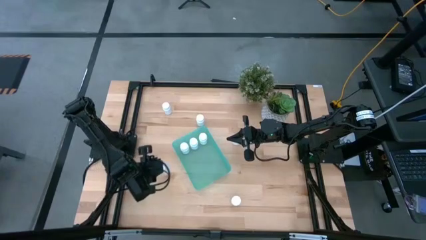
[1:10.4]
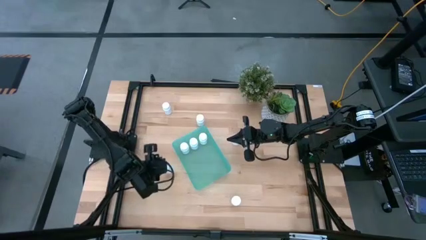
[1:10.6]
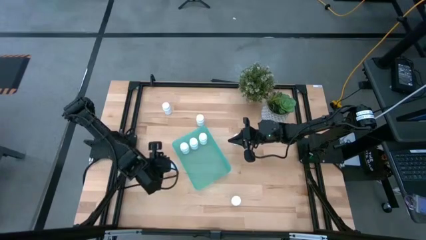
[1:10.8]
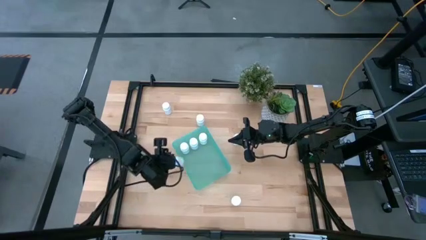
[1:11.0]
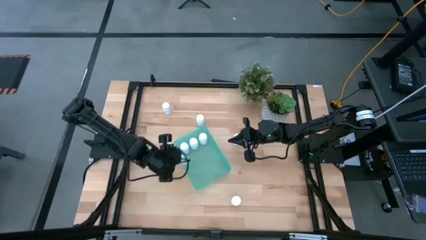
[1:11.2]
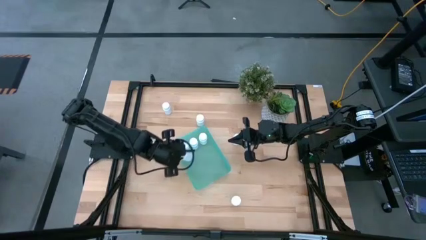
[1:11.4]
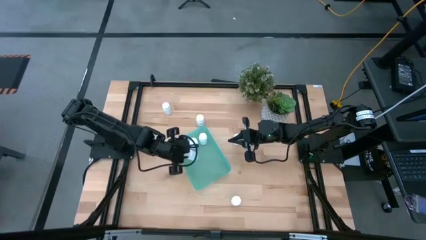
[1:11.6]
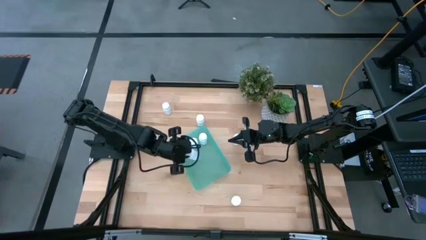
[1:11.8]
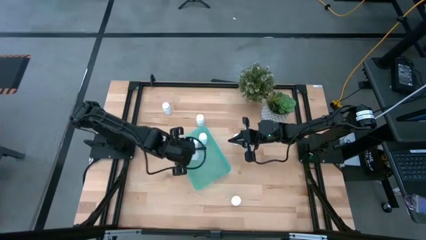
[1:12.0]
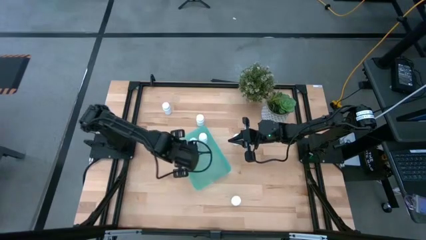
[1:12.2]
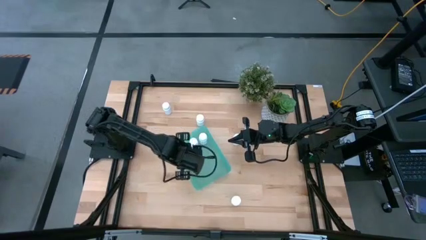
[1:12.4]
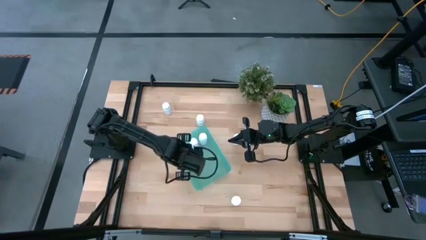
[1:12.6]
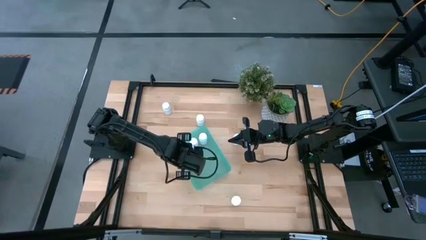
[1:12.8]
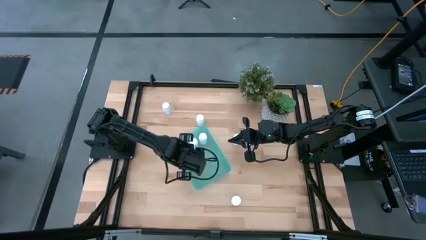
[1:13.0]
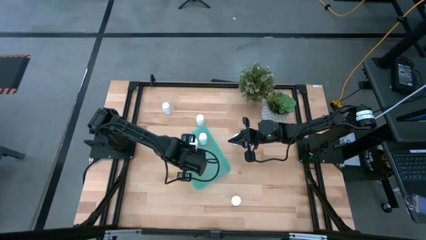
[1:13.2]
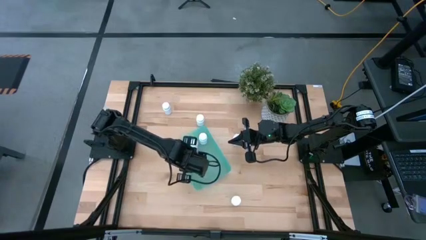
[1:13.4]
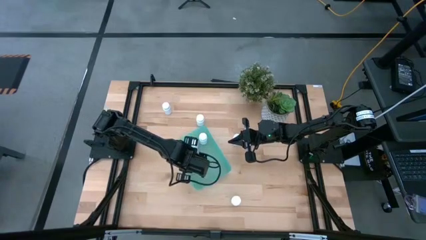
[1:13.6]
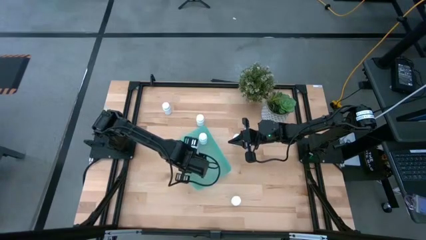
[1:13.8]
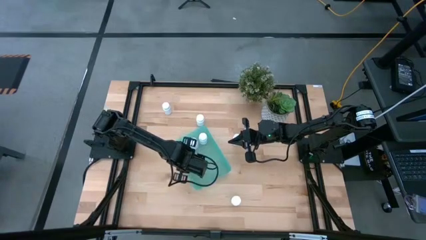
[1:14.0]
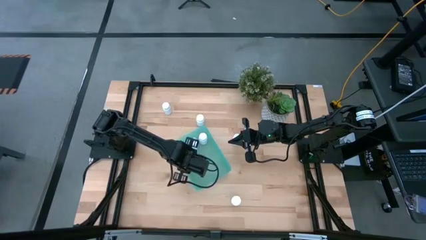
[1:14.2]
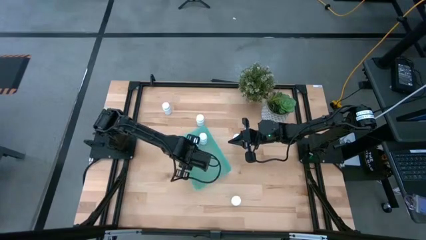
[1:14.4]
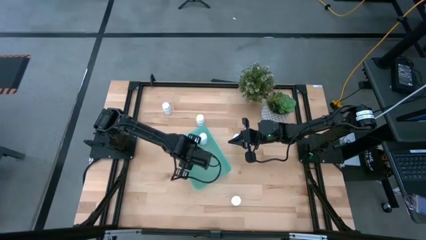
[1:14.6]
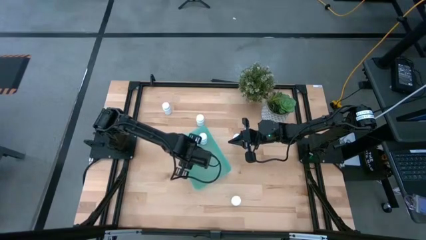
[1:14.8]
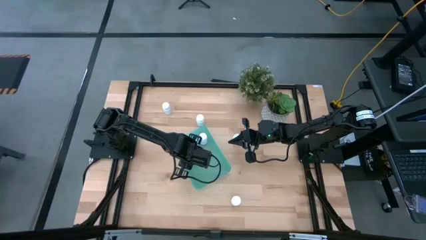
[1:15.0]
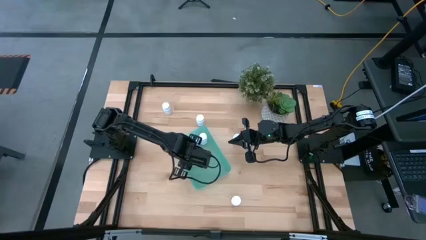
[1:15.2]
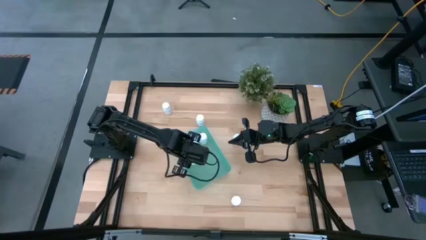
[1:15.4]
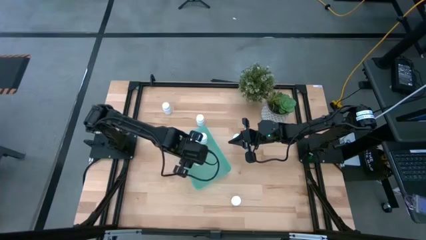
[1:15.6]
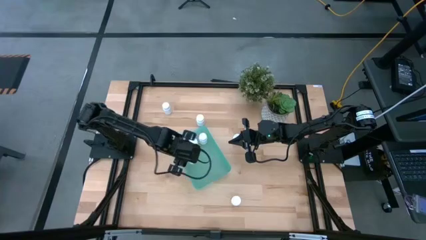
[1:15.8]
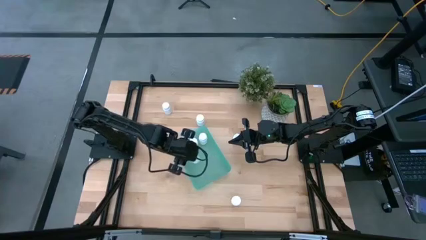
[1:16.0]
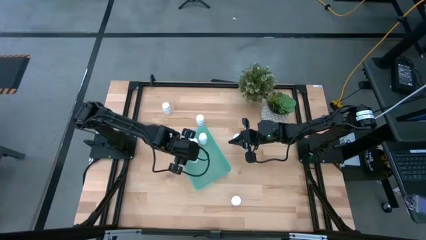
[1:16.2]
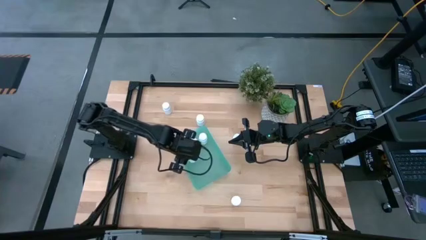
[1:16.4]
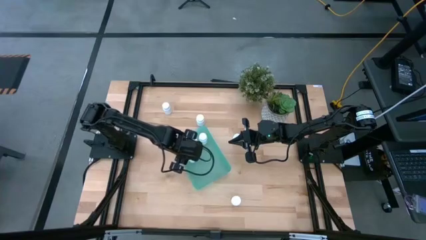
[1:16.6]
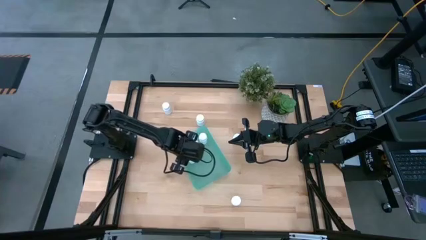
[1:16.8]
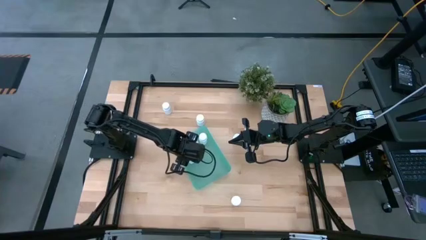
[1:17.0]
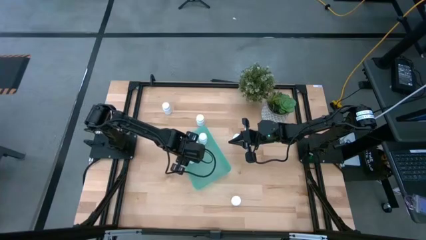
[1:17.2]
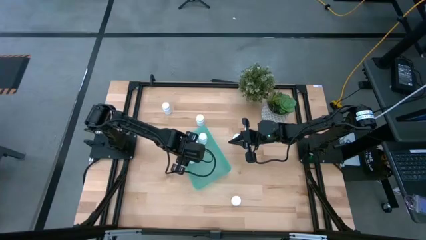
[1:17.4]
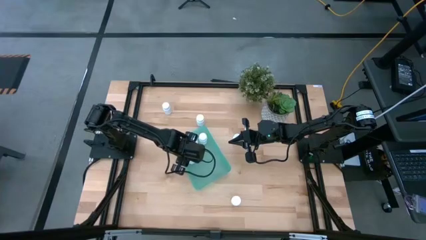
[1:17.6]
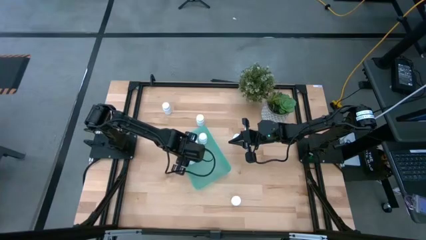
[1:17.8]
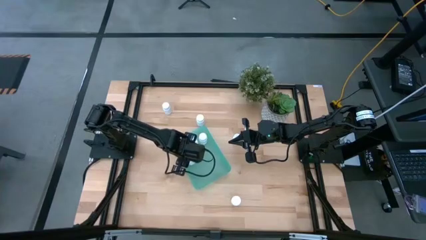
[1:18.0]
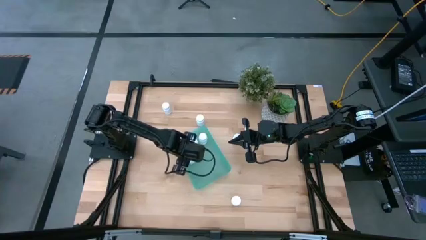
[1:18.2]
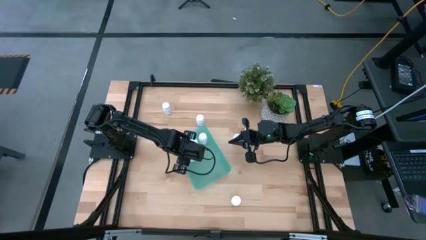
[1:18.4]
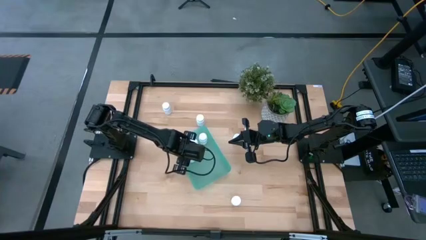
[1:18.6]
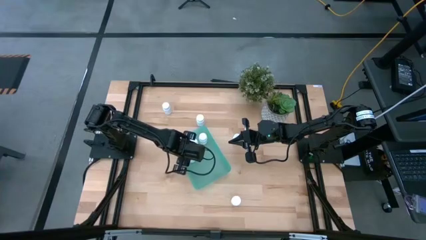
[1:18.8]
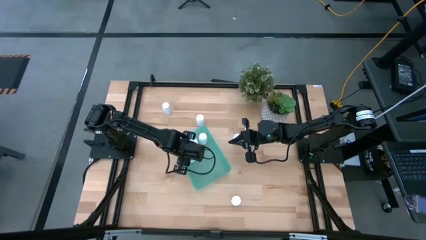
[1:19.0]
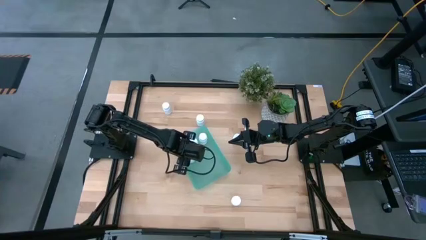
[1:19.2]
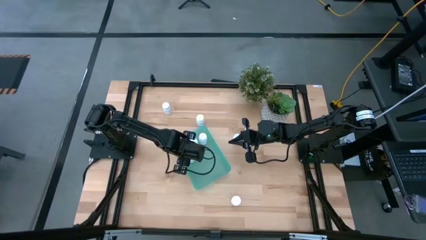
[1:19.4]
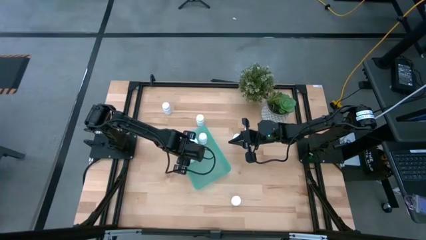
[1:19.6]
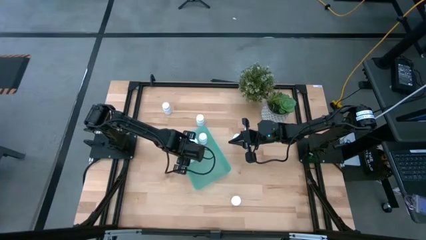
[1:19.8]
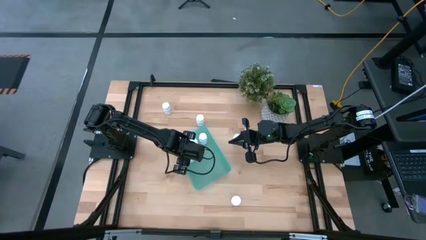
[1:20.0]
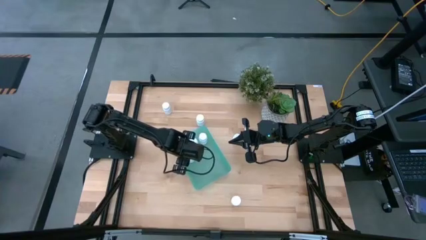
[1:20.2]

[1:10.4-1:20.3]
Task: Pick and place pill bottles into a basket
Put the white medicine bottle into the green bin

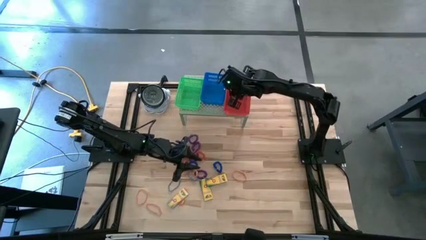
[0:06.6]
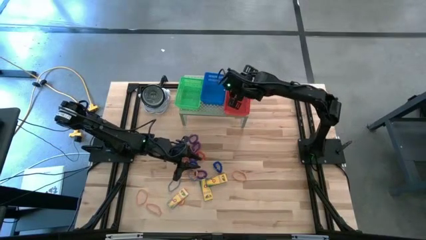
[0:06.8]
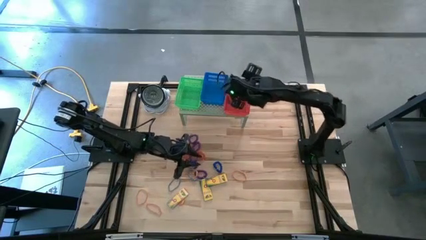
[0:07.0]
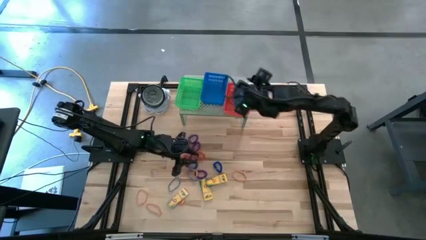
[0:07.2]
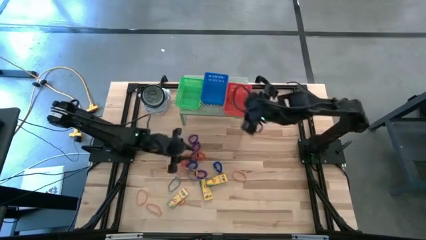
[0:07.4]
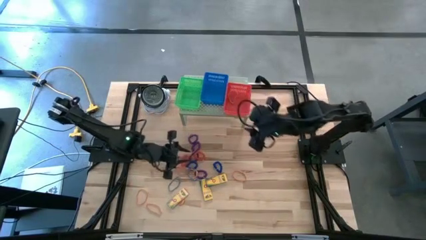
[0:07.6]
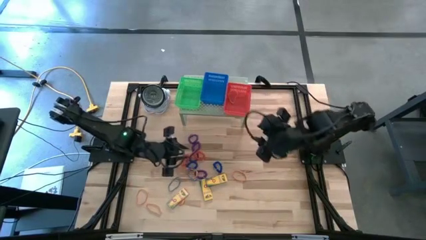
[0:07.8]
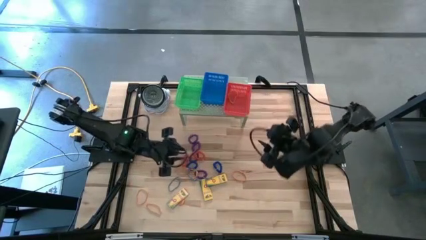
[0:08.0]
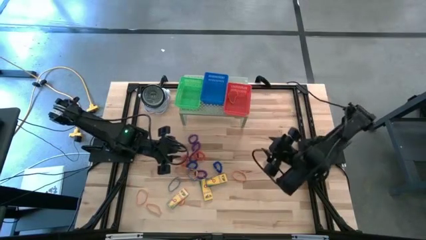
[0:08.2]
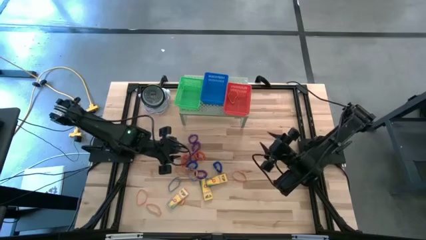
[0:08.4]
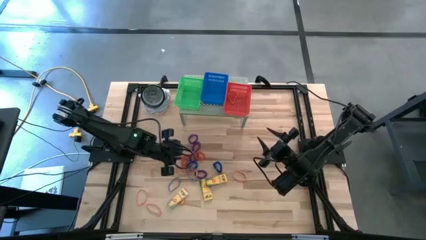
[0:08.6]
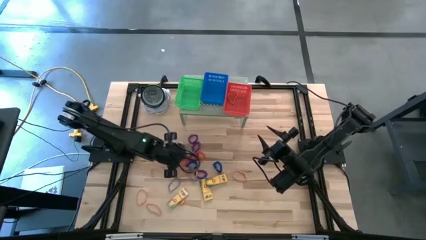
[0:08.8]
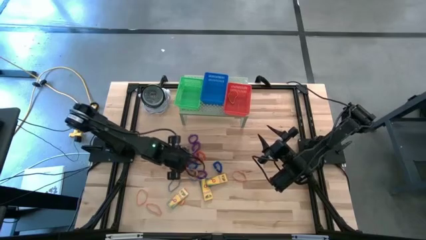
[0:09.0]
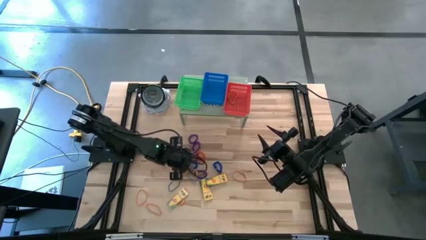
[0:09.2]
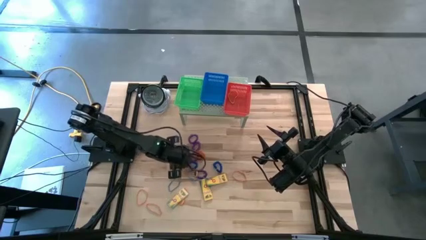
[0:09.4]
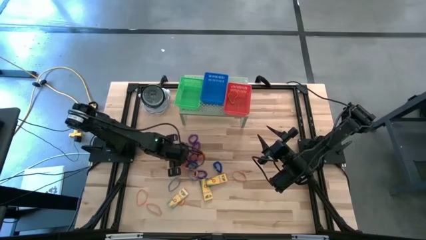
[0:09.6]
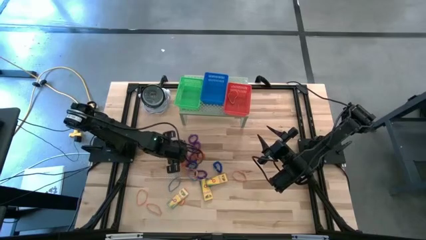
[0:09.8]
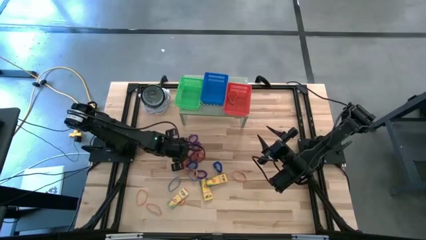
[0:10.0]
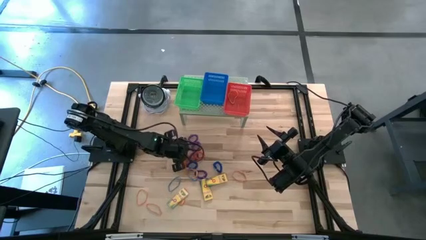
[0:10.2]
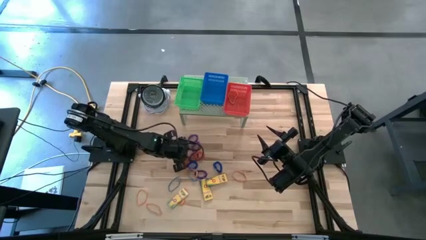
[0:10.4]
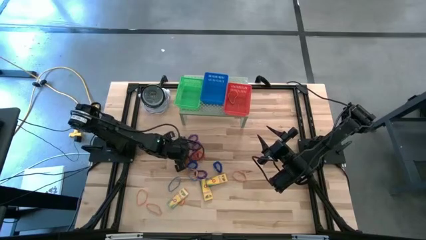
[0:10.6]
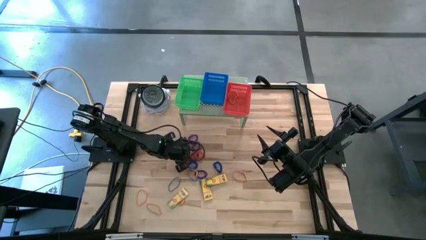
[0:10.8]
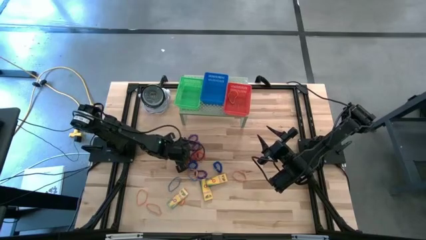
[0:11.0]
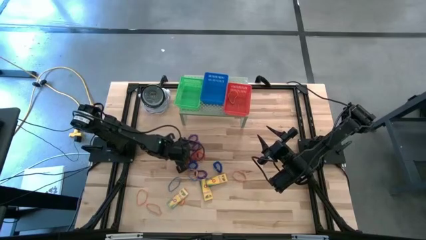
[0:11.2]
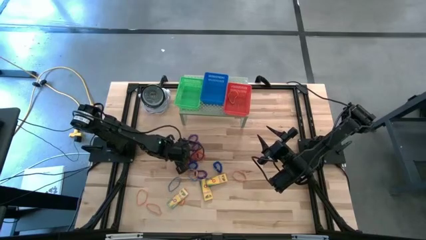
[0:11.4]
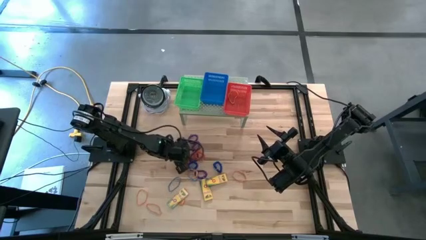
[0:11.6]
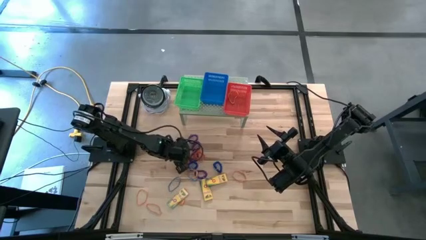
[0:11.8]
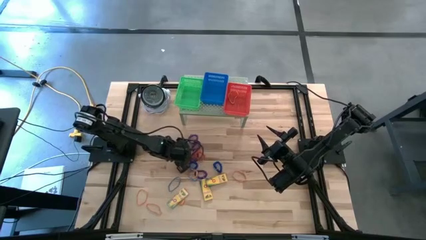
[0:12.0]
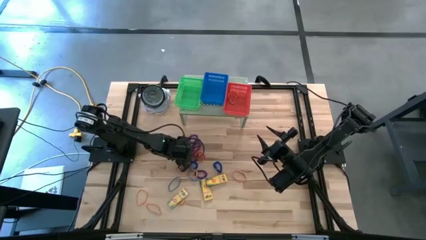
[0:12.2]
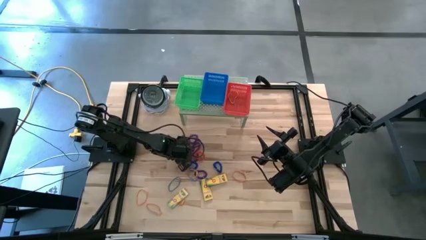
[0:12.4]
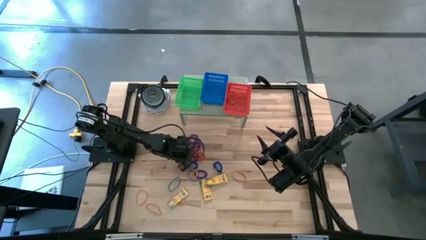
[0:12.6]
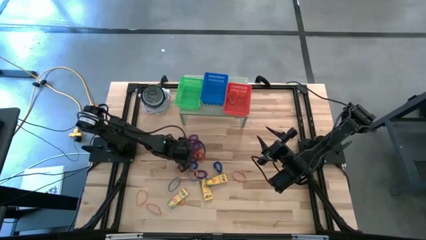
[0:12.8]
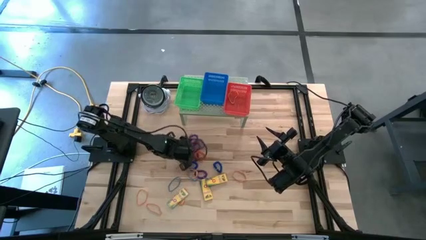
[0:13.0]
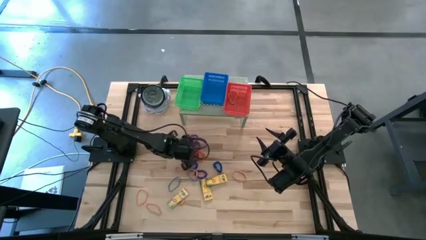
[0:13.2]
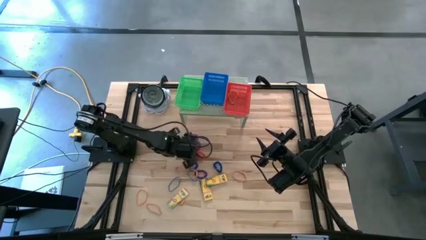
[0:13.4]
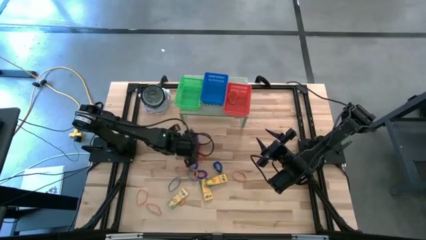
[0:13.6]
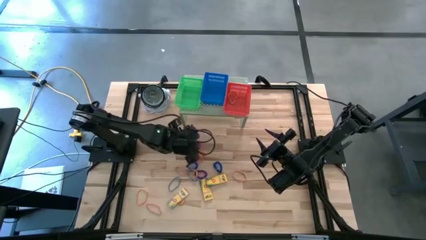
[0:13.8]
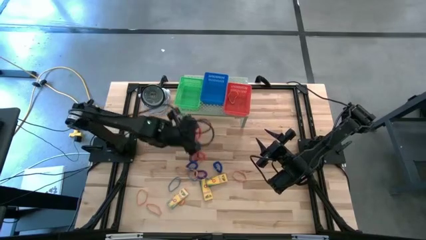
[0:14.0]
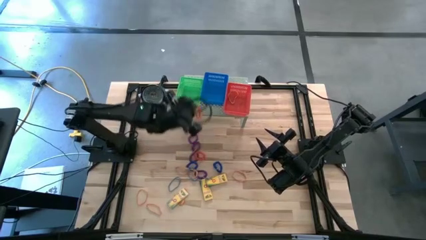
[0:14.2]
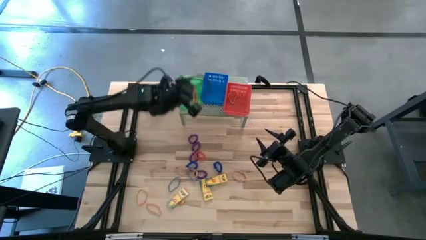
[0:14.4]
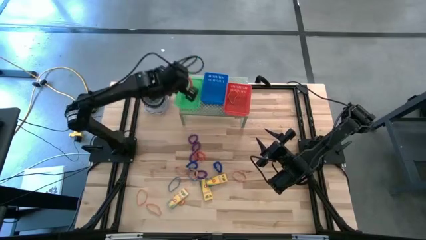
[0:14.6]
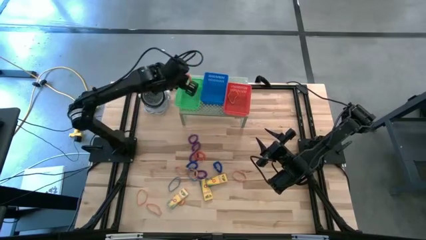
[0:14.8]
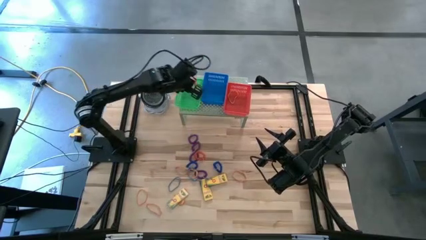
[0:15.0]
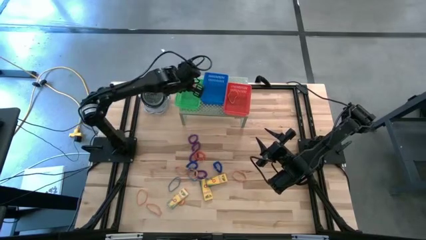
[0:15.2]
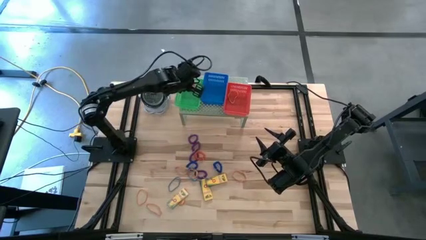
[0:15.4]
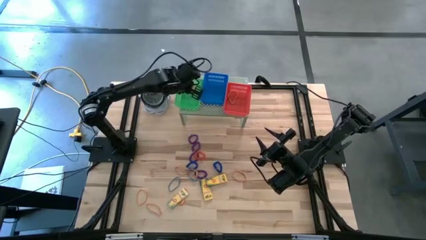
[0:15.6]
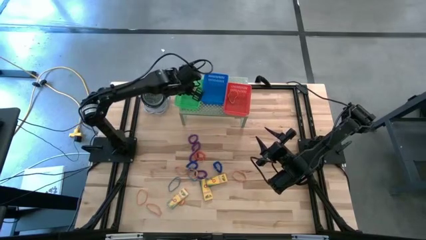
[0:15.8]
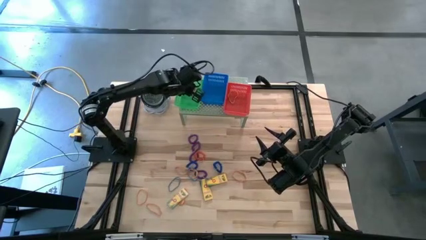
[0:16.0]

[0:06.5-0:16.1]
Task: Pick & Place Office Desk Supplies
Put the orange spring keychain into the green bin on the shelf
